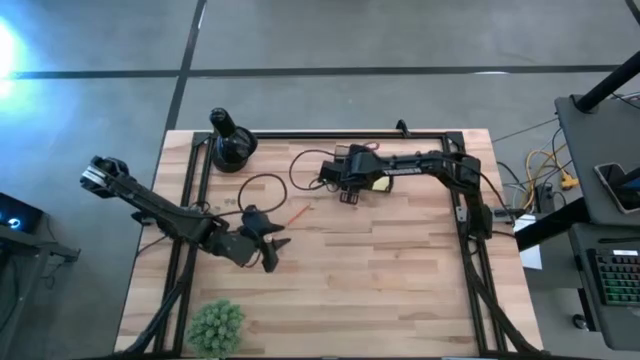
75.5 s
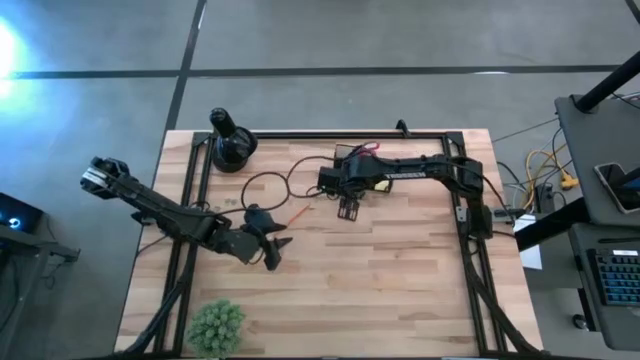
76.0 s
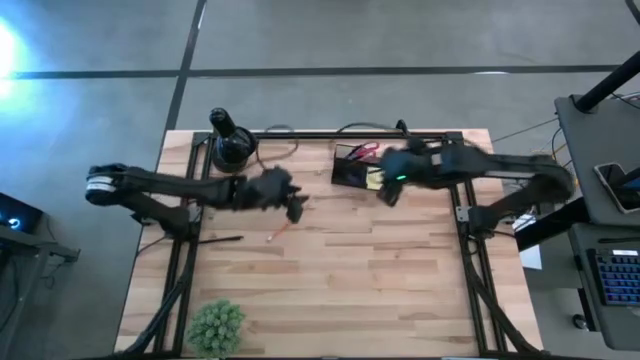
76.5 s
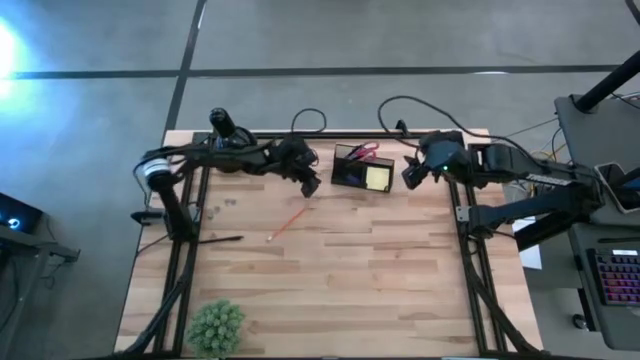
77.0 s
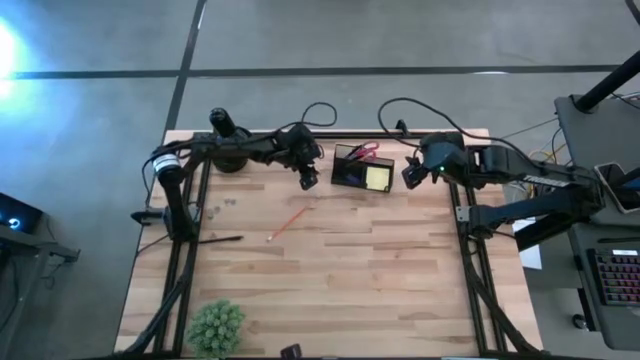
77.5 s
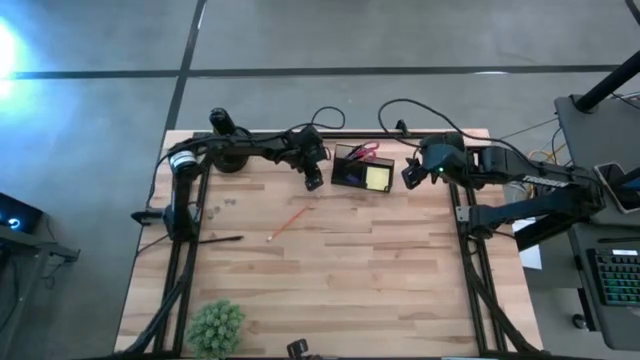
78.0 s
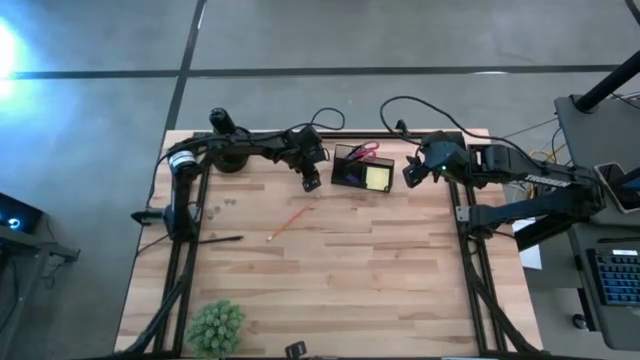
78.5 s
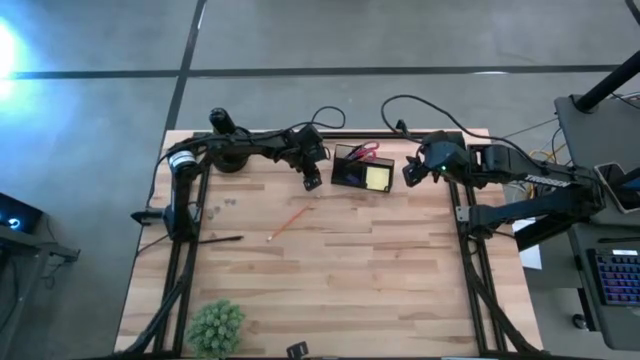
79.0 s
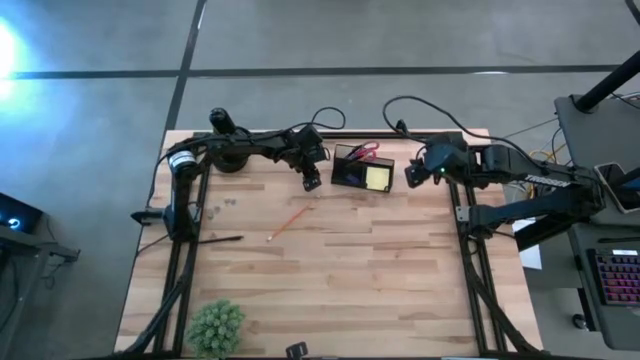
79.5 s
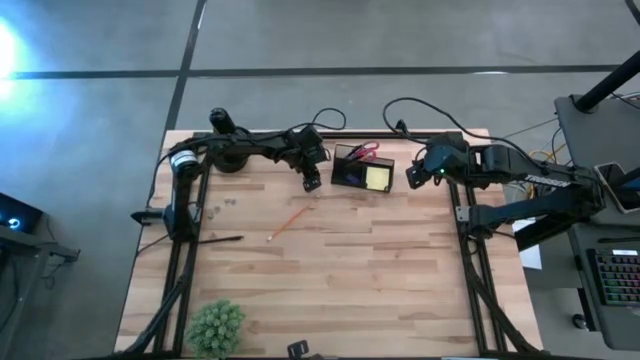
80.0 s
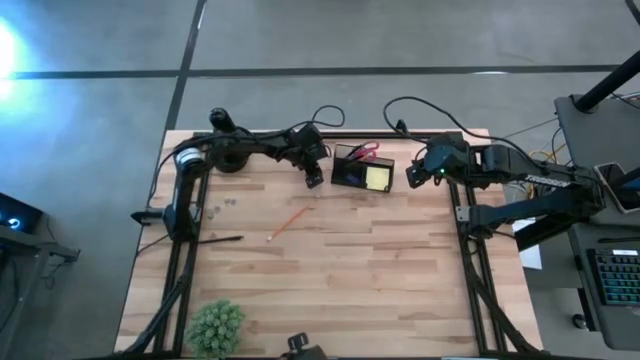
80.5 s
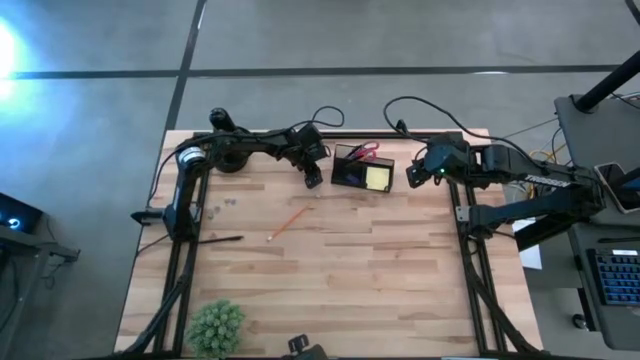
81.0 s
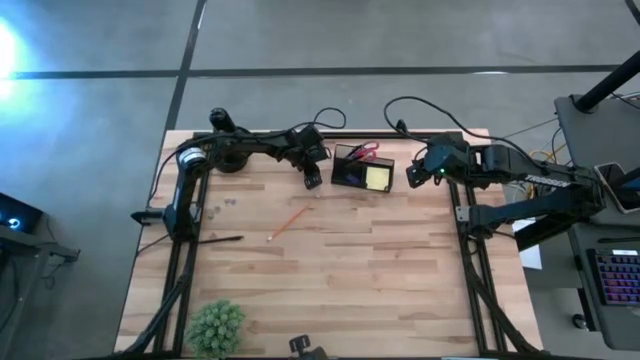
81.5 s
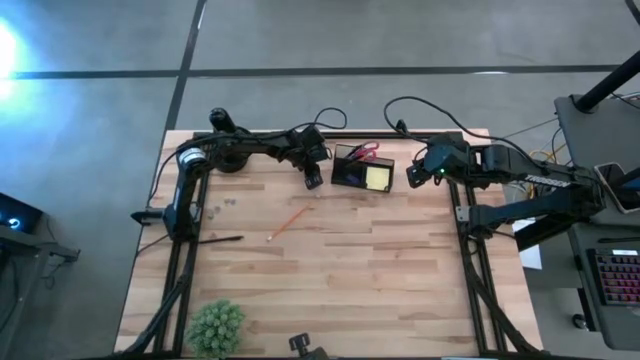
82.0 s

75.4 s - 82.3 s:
Task: Pick and place office supplies into organizer
Put the top yellow binder clip into the desk organizer

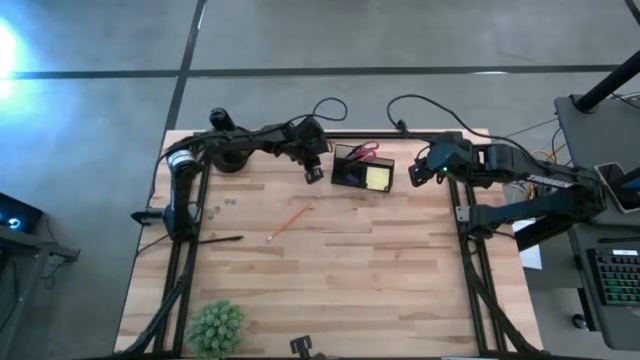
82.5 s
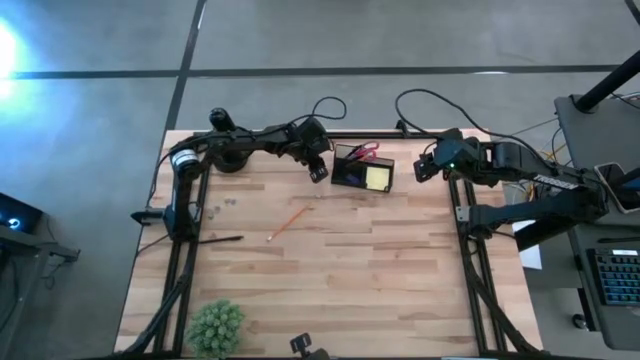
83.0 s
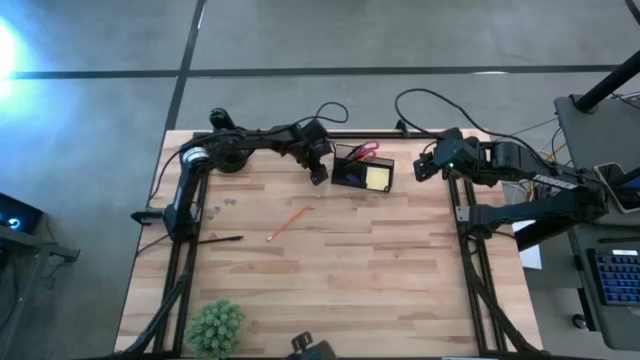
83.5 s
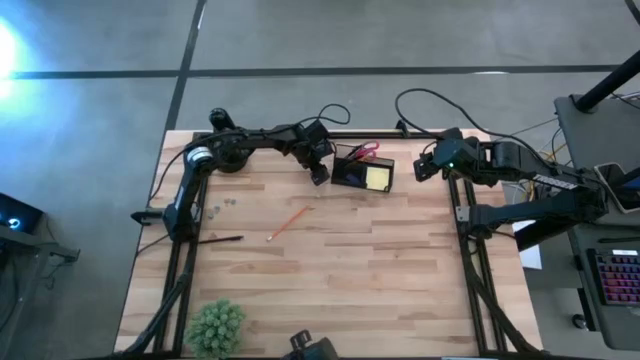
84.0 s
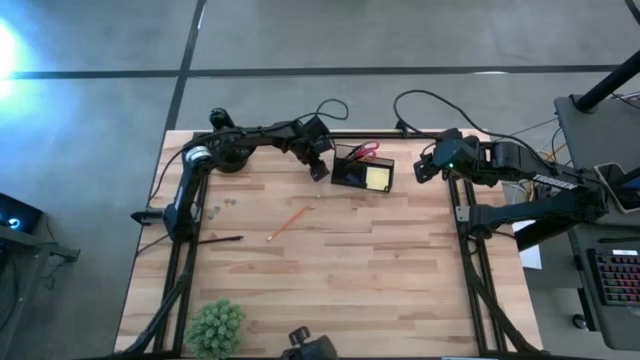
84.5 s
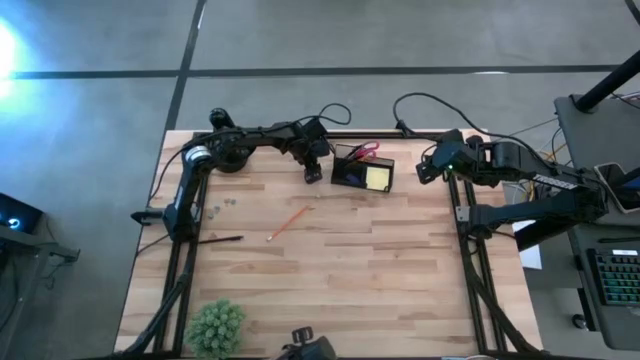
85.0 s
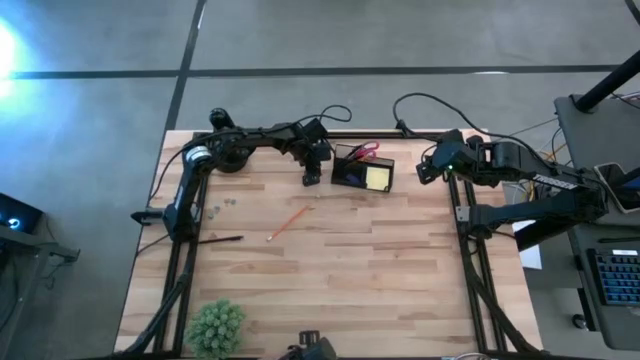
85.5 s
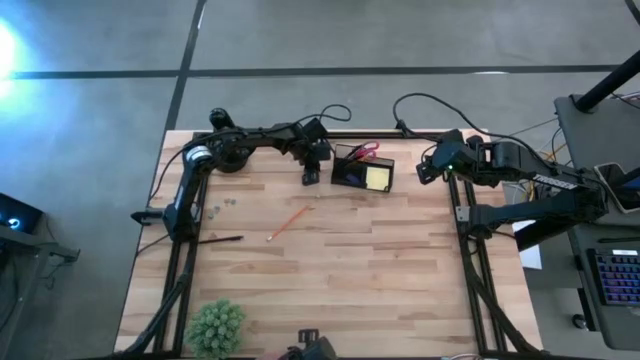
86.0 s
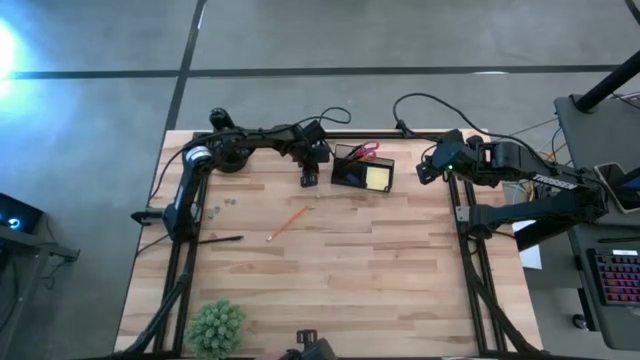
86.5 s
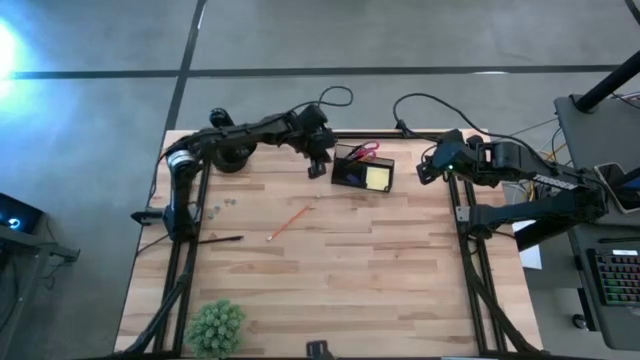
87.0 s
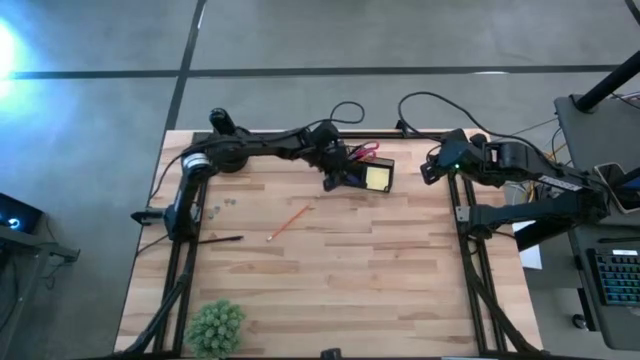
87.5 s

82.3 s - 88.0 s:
Put the top yellow binder clip into the desk organizer

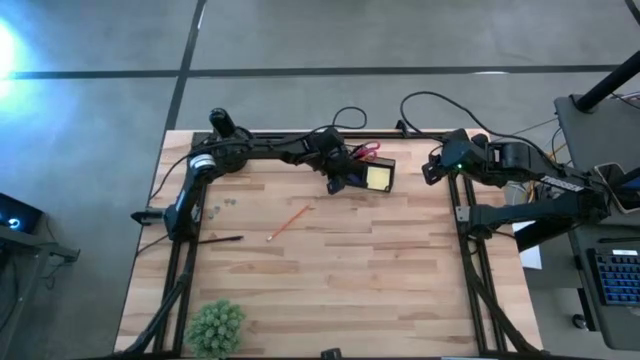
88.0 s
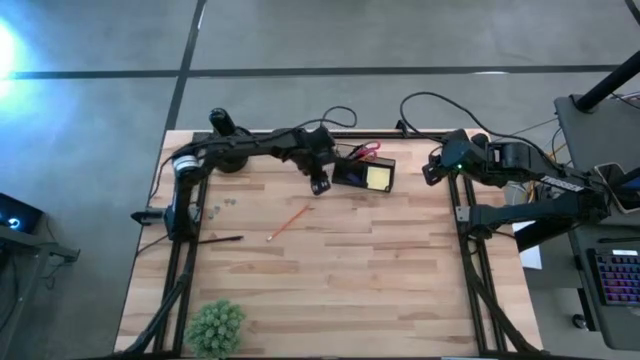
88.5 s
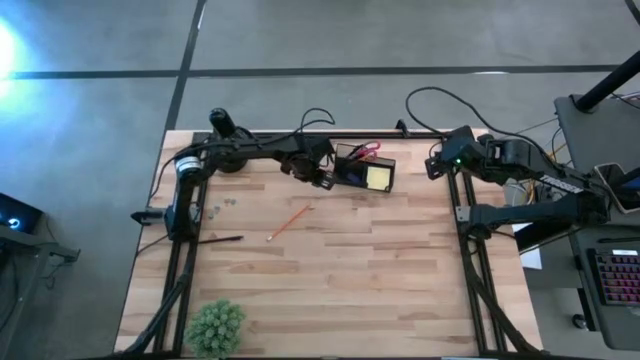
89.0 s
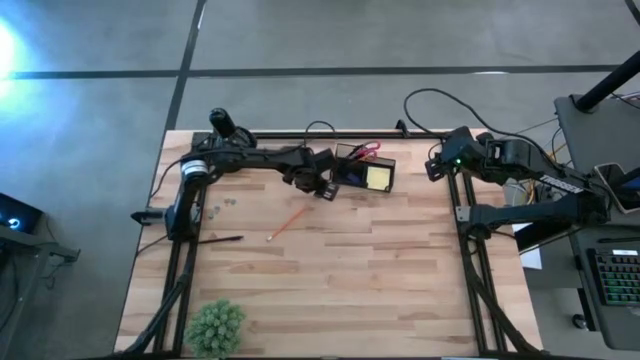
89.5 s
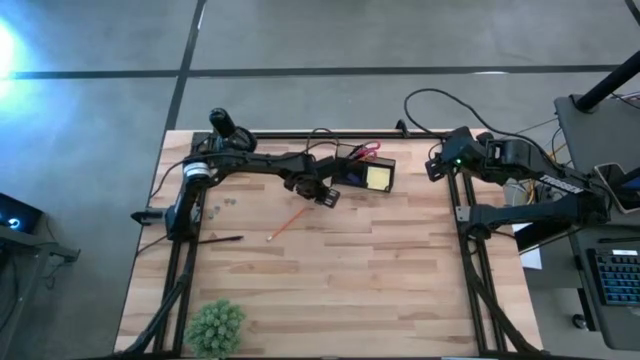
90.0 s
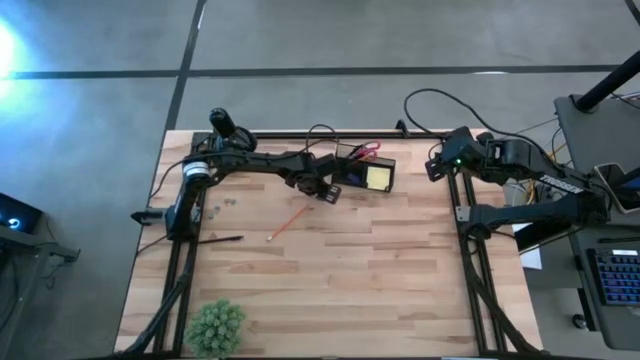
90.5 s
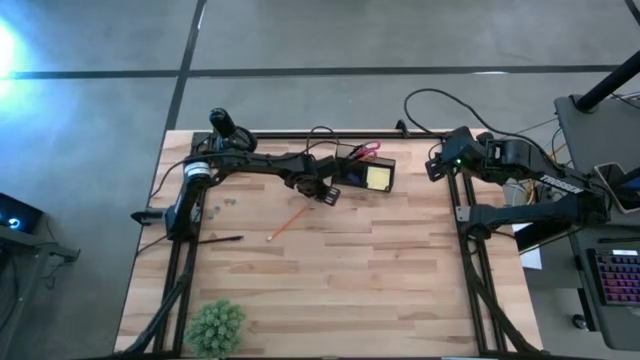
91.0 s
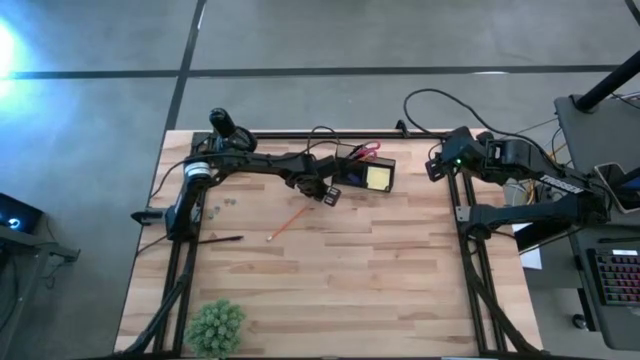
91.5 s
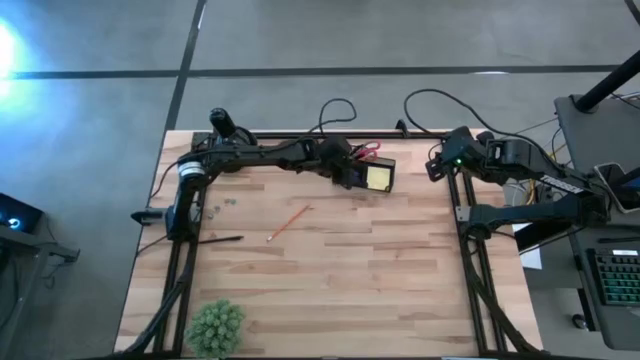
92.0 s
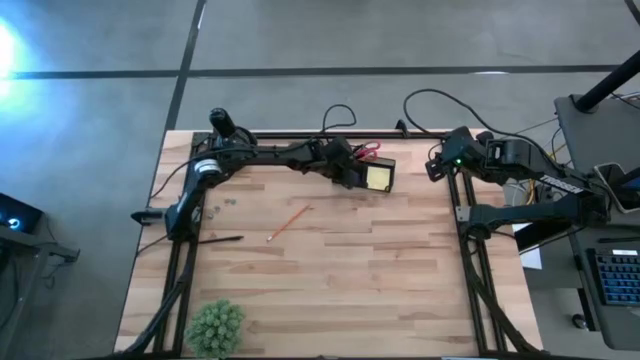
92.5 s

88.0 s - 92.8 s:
Put the left yellow binder clip into the desk organizer

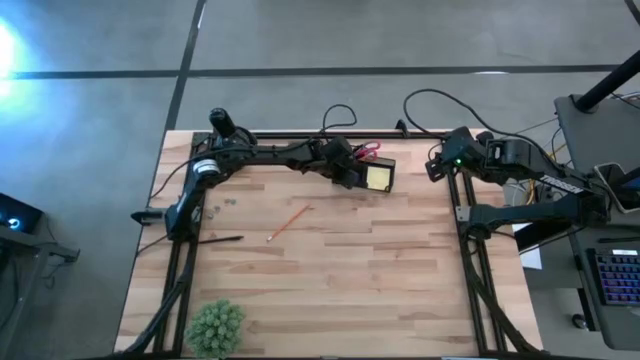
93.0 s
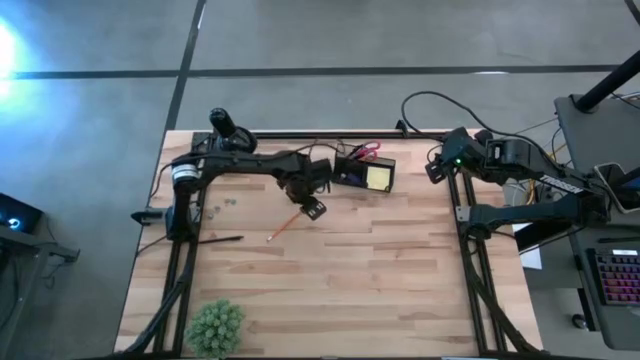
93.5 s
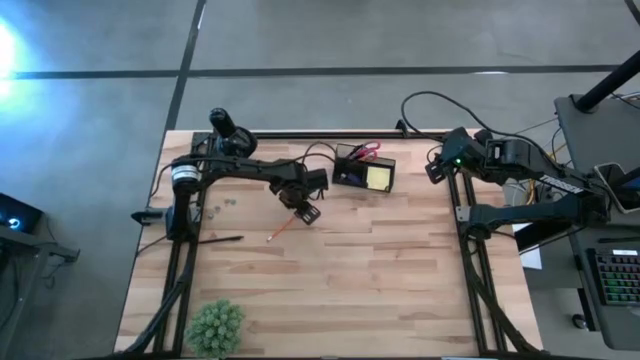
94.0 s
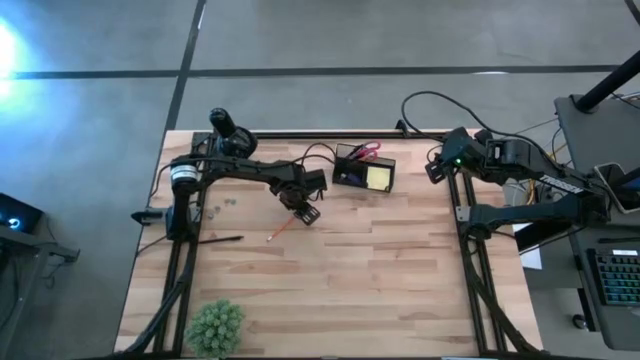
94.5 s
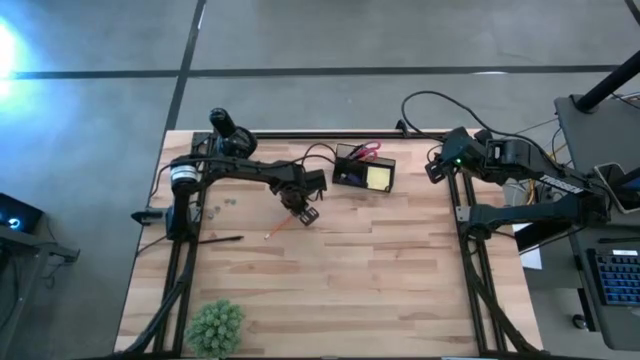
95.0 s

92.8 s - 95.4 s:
Put the pencil into the desk organizer
